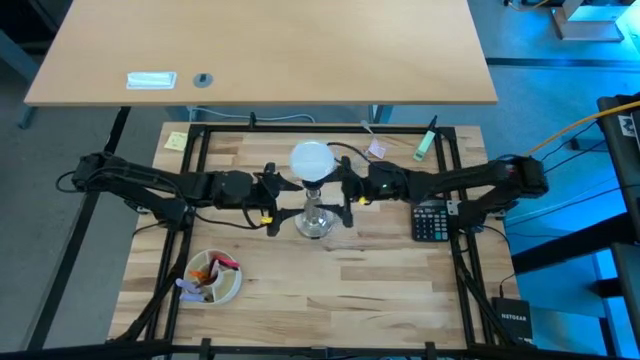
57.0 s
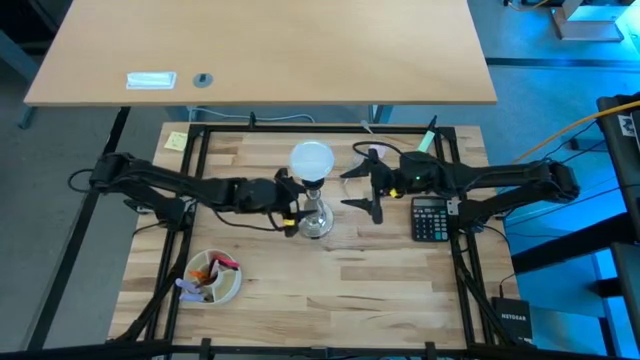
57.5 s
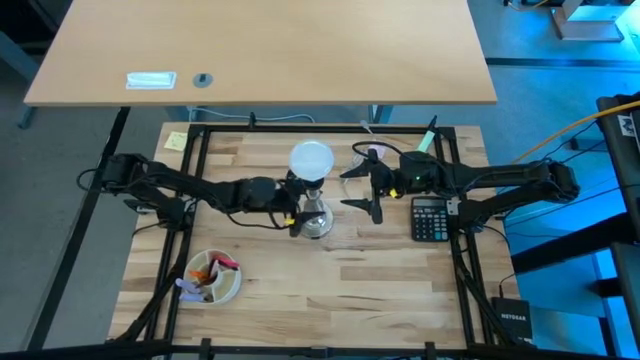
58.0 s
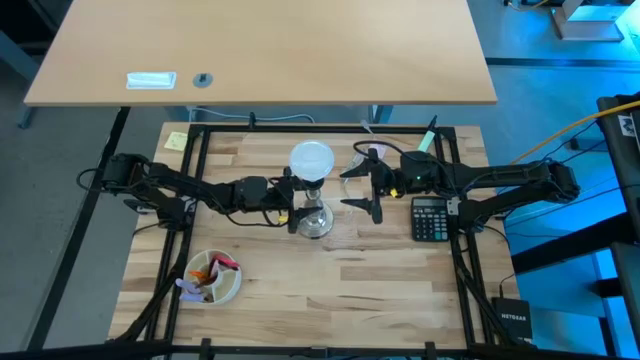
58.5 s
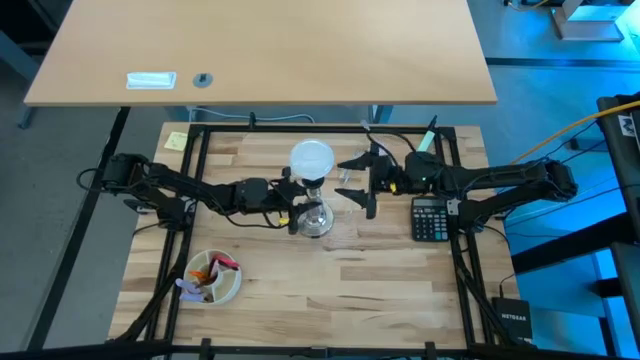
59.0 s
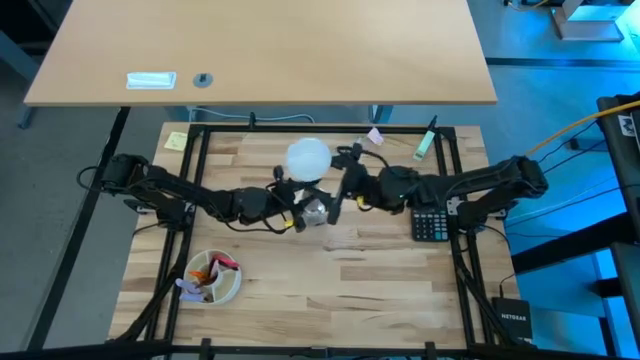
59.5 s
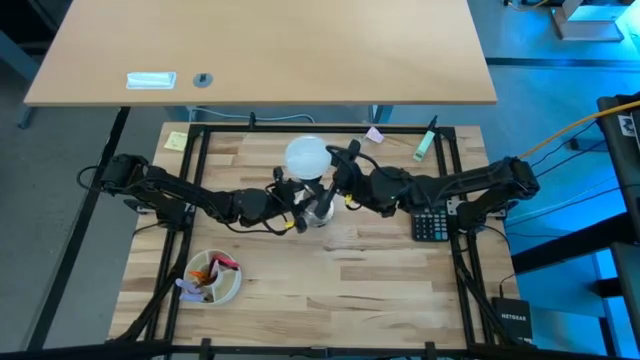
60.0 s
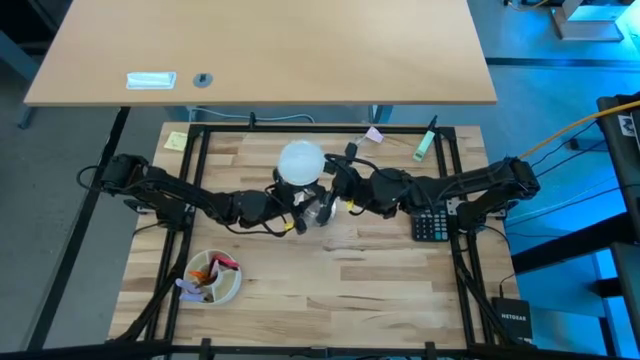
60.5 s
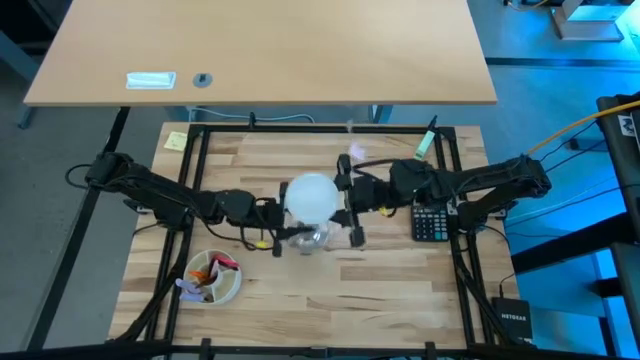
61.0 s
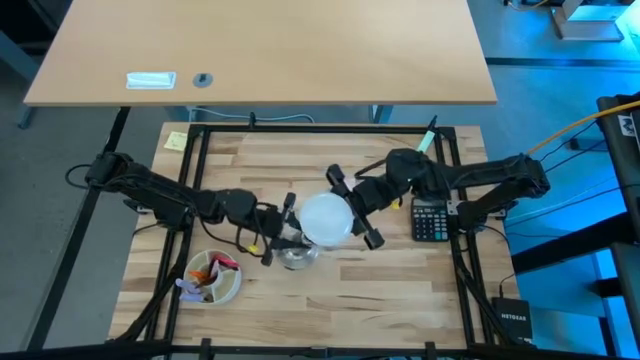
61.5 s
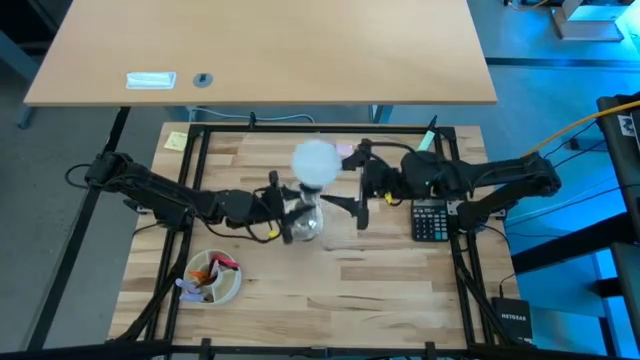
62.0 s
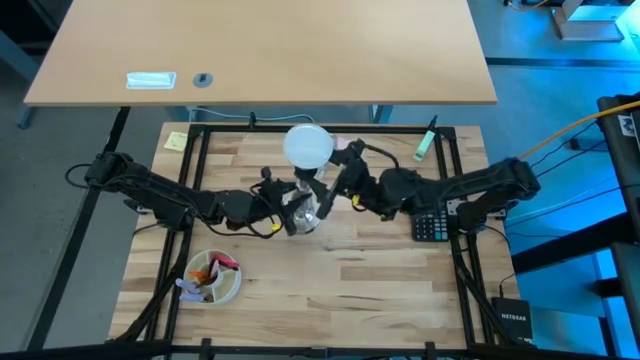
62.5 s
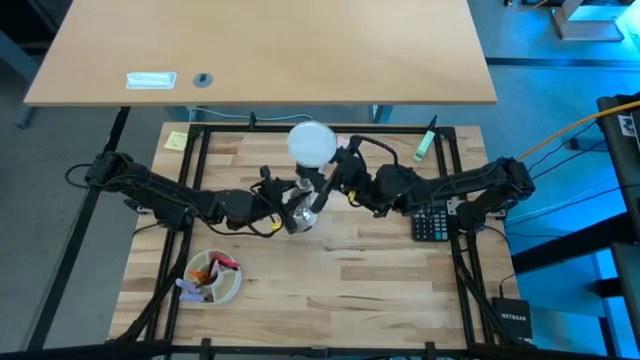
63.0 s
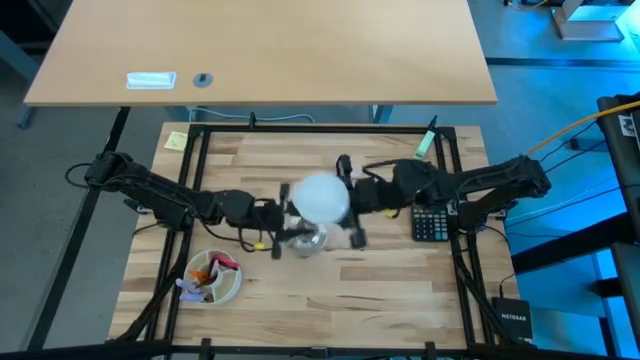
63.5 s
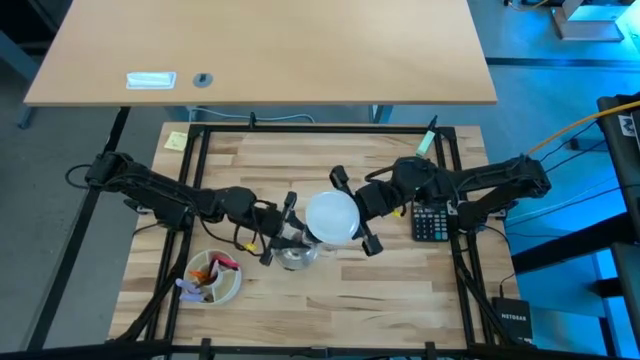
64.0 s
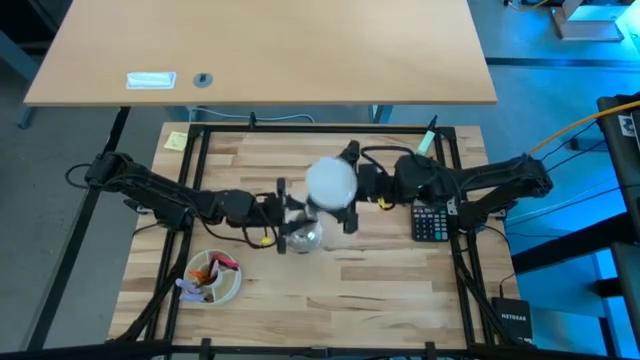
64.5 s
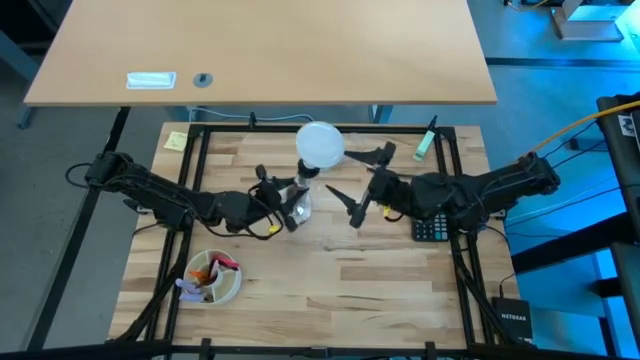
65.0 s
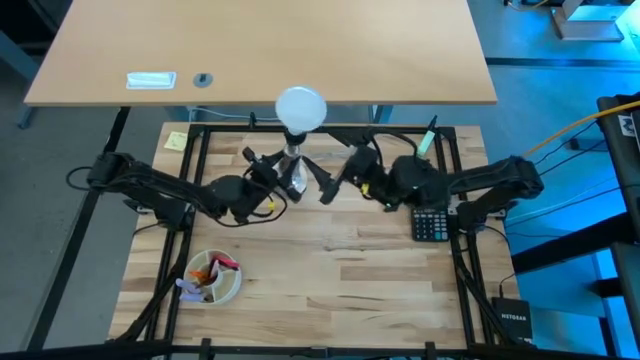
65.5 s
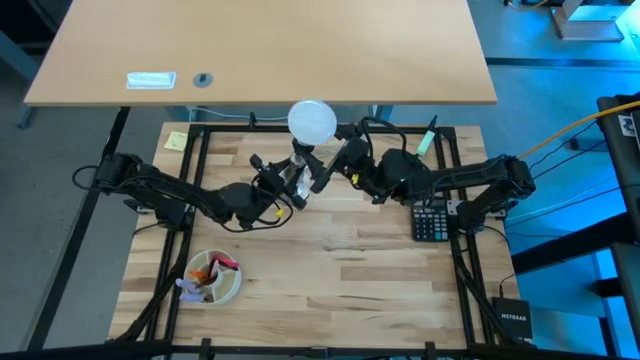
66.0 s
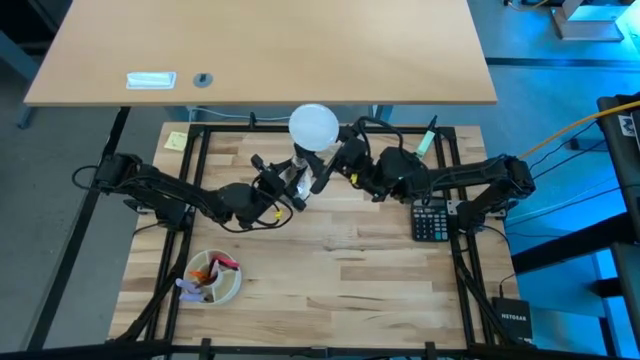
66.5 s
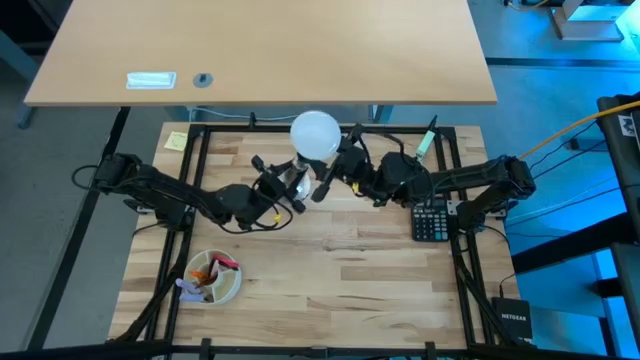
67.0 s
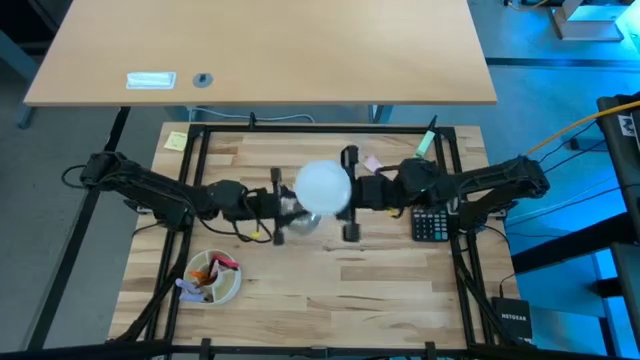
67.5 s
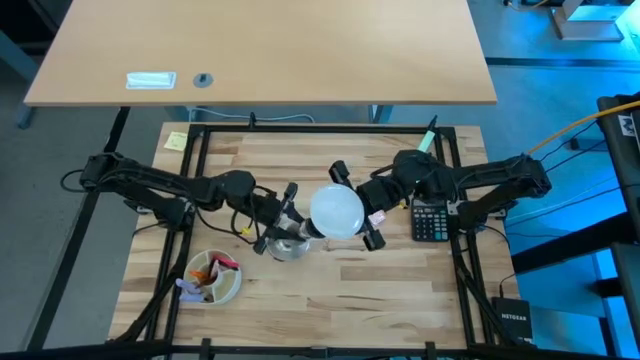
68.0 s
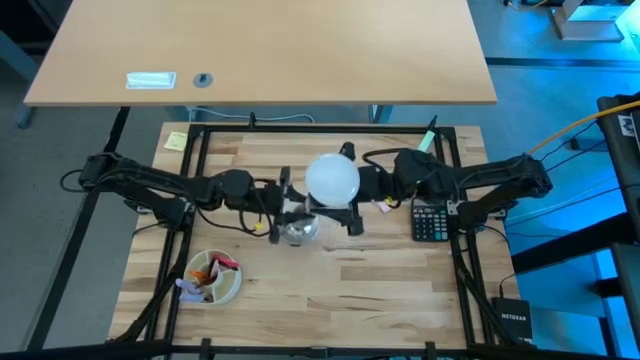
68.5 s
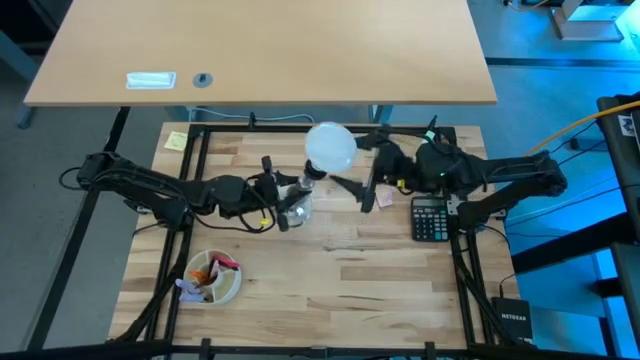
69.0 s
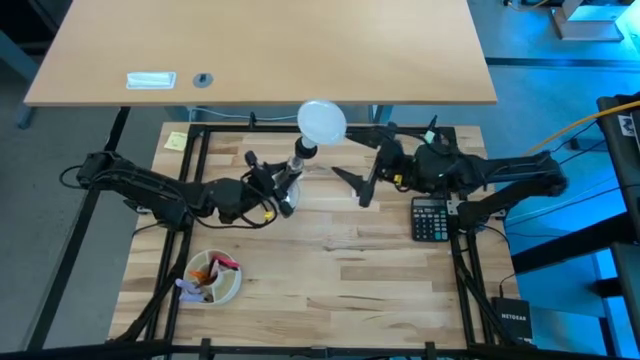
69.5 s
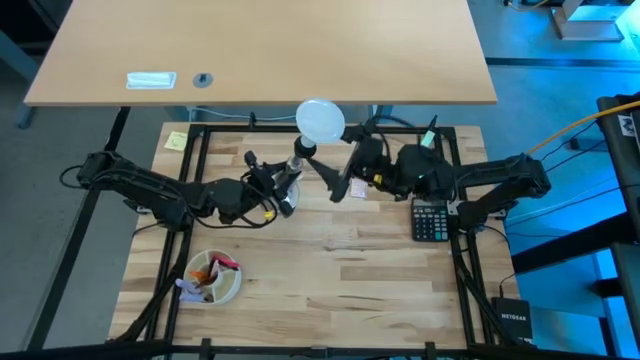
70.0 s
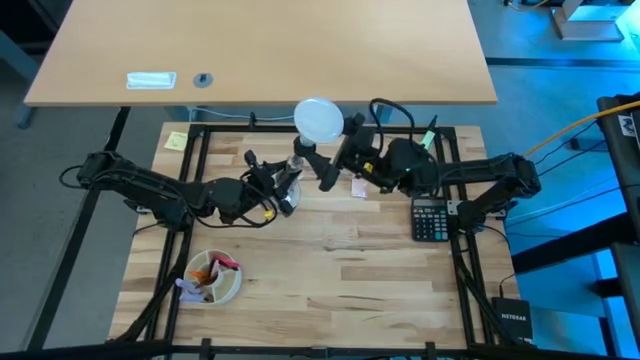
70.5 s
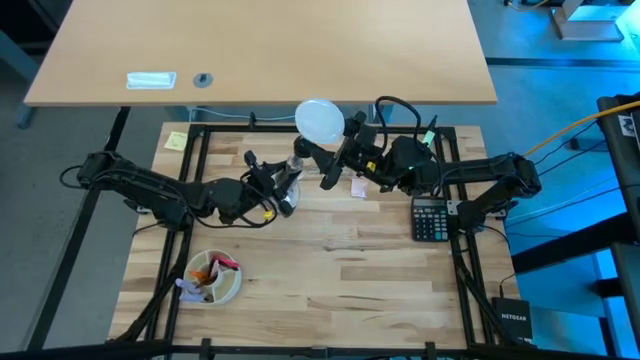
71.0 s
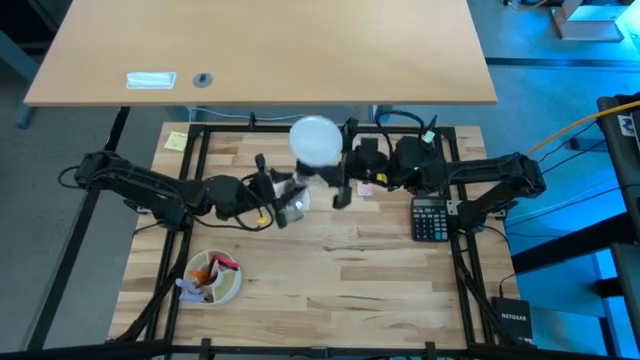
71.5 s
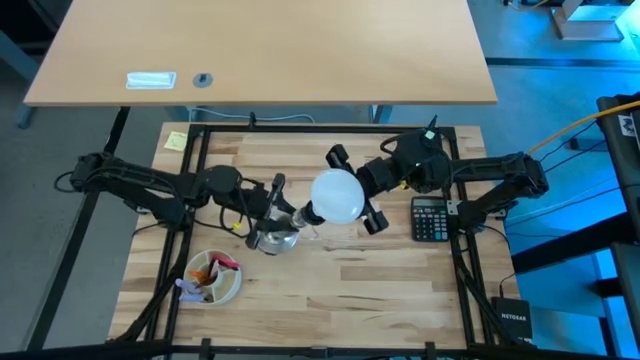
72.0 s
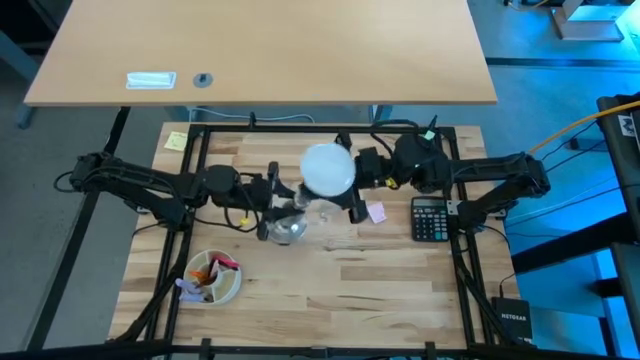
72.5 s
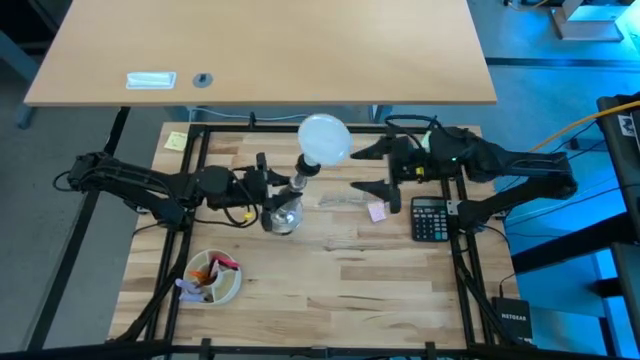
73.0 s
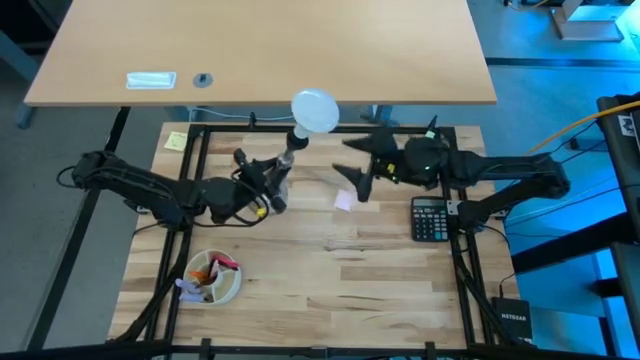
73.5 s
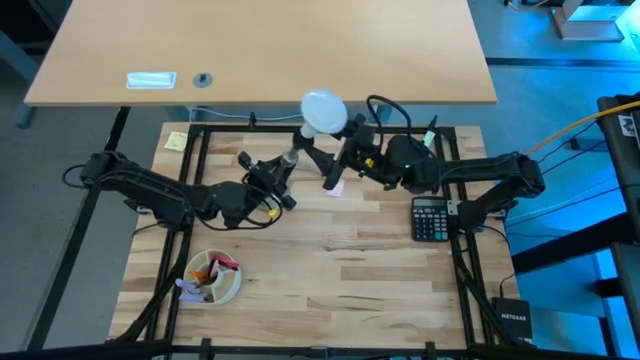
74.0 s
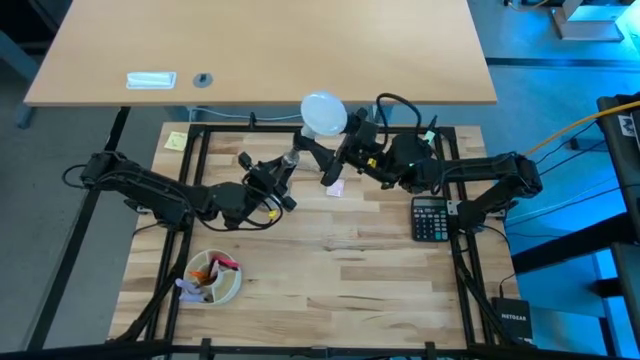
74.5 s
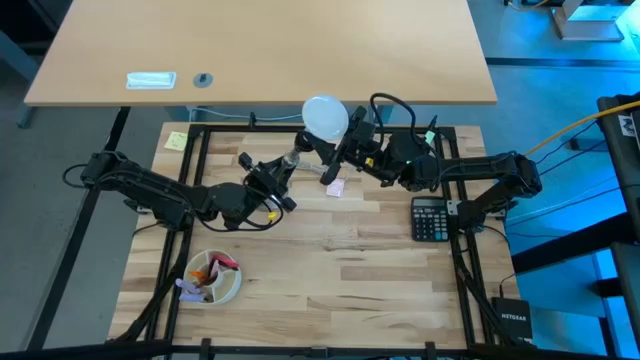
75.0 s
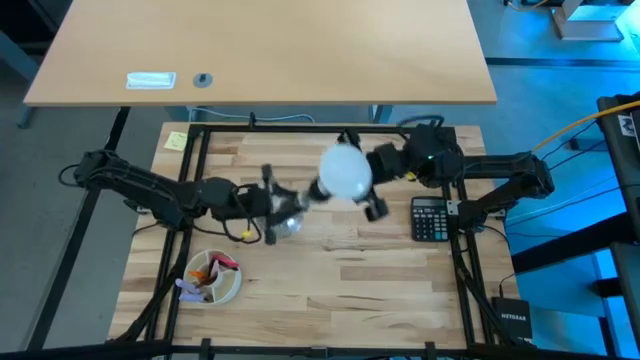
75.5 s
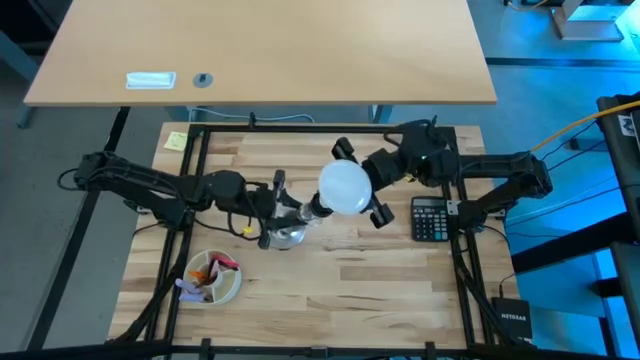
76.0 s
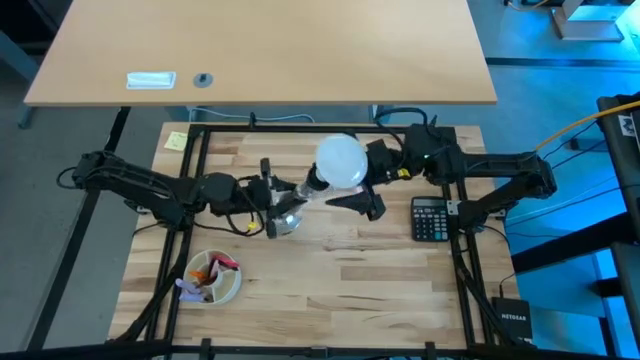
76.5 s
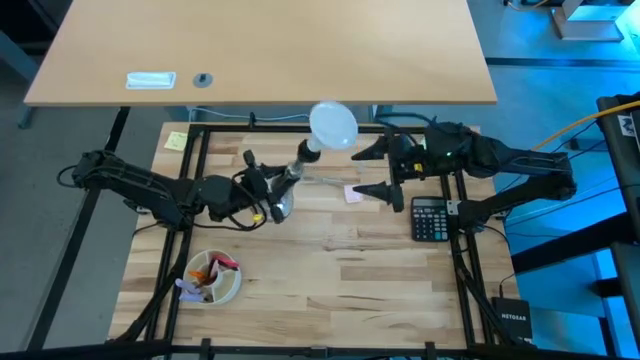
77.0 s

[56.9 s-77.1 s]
Task: Screw lightbulb
Remove the lightbulb from the silver lamp

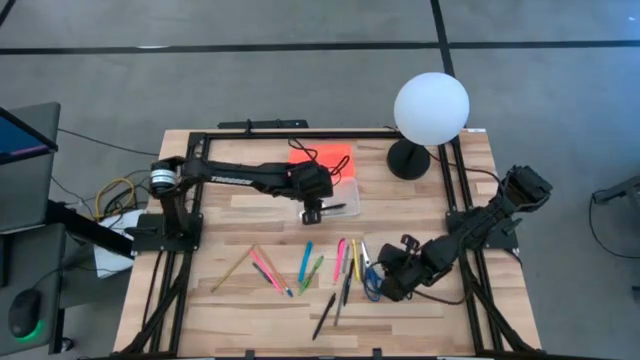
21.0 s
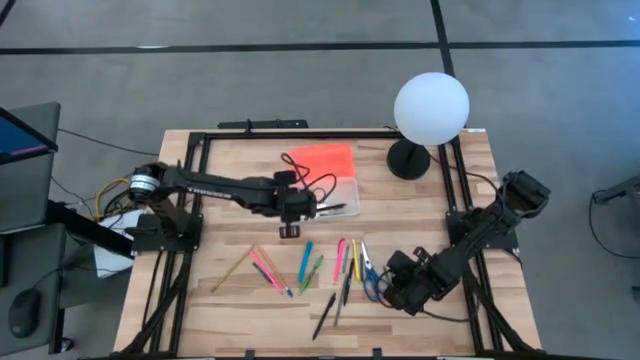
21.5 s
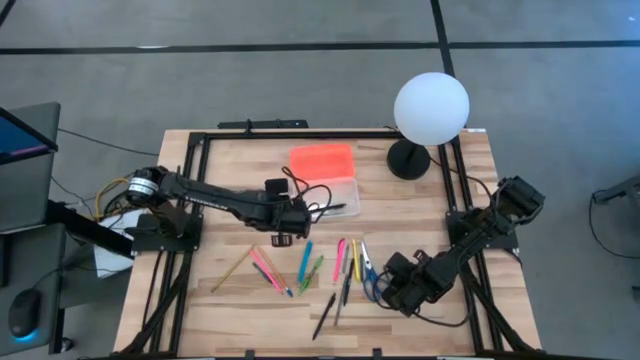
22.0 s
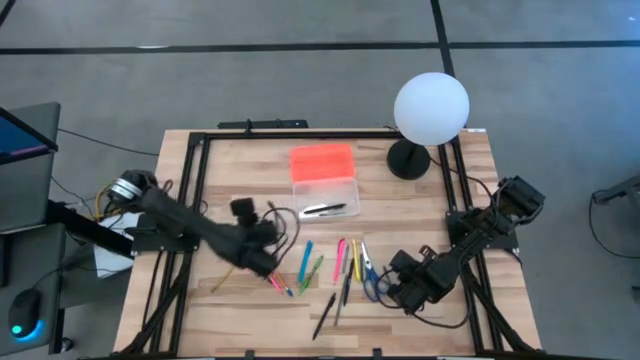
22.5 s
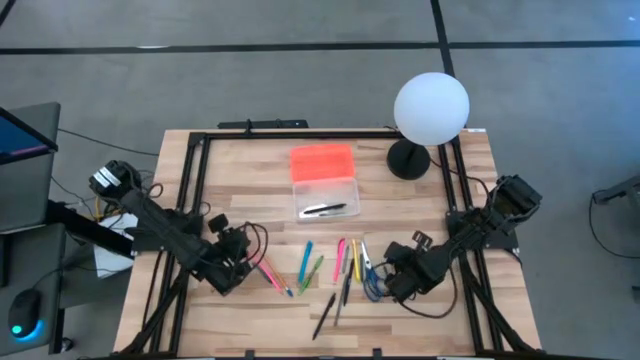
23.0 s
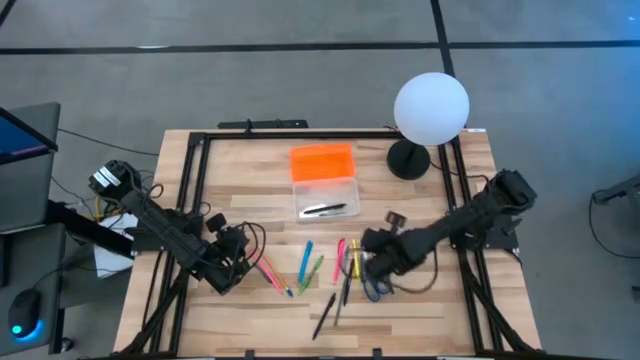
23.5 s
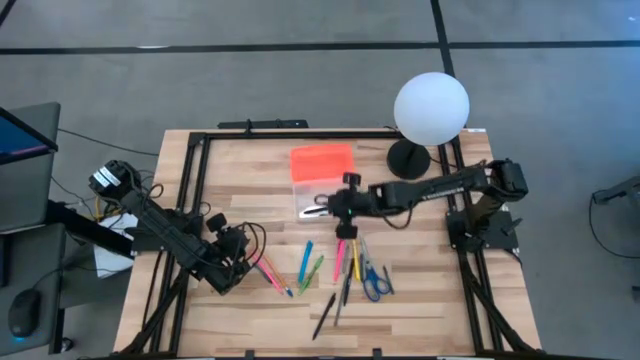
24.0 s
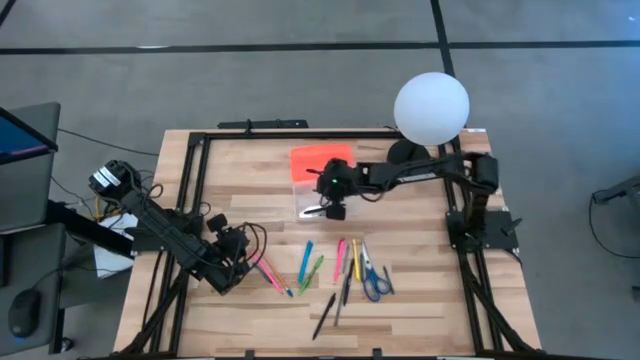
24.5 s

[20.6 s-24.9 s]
Task: Pick & place school supplies into a supply box
Put the green crayon into the supply box
